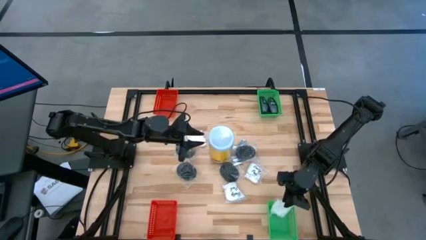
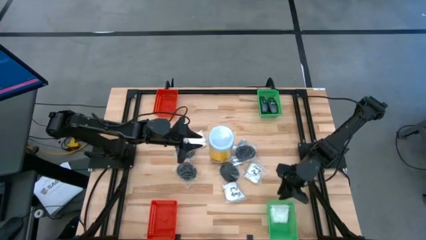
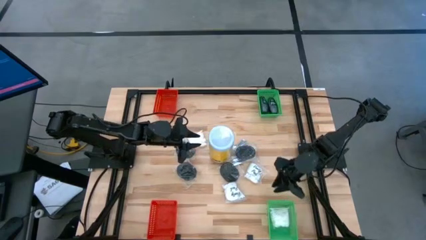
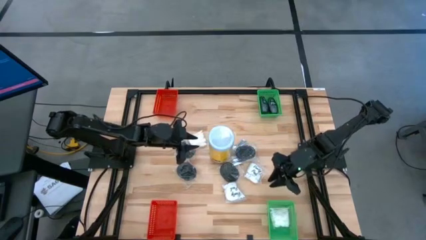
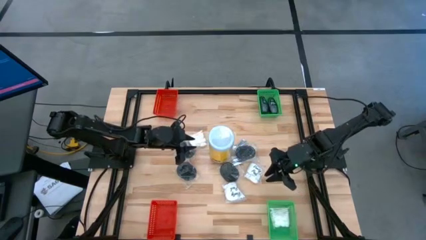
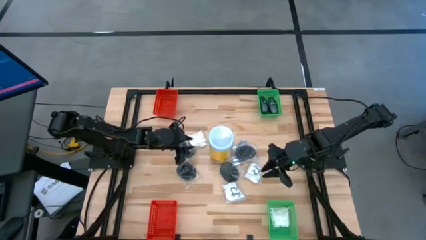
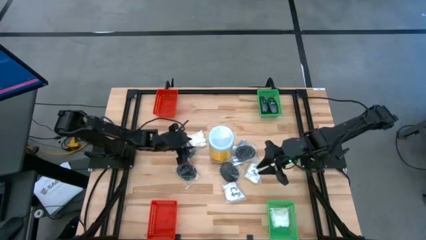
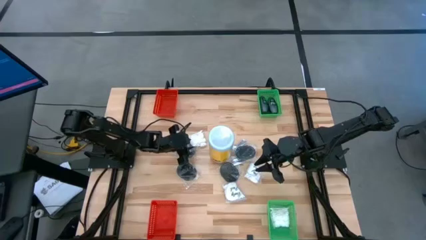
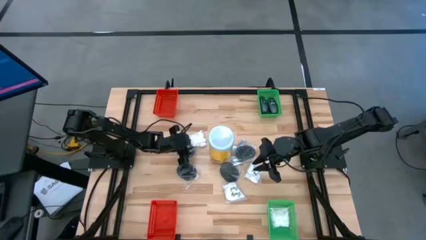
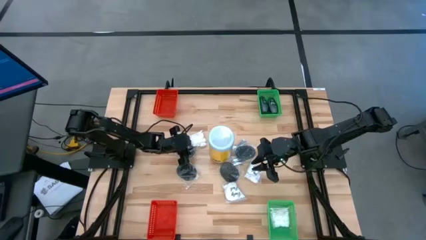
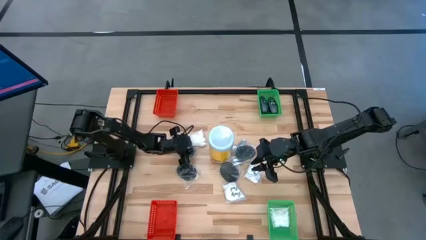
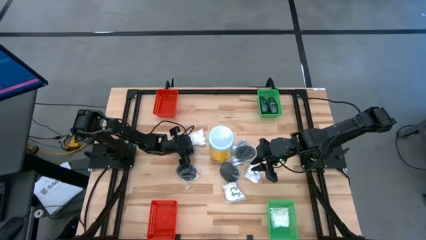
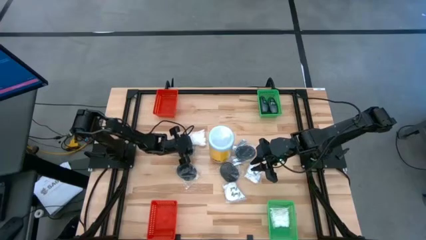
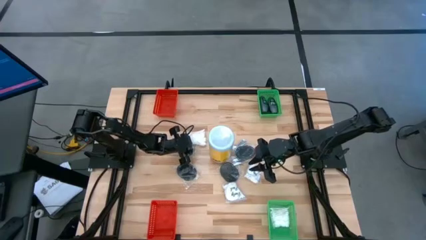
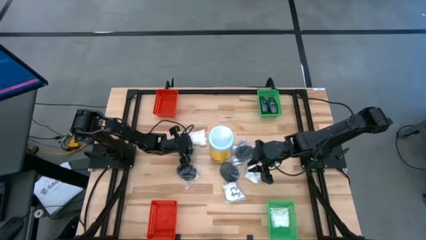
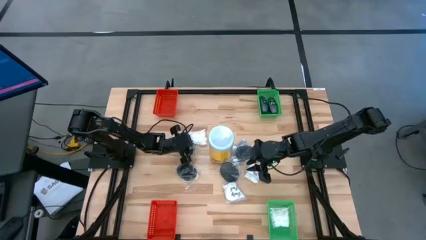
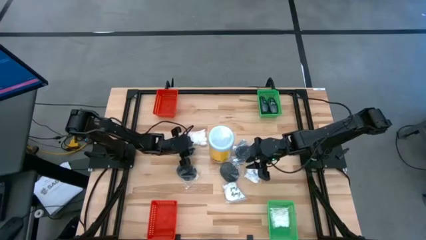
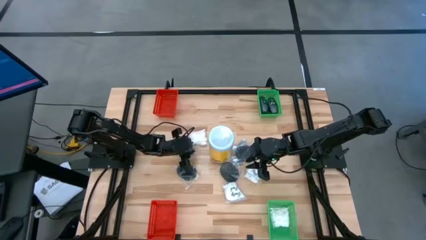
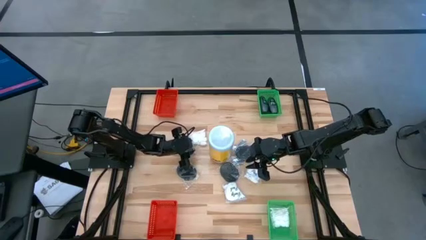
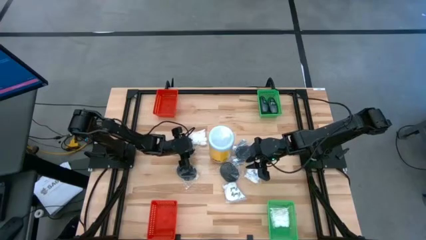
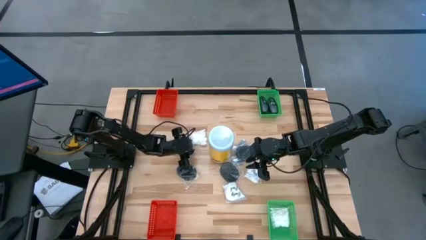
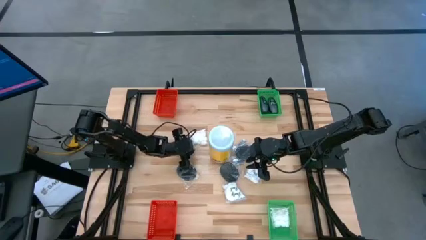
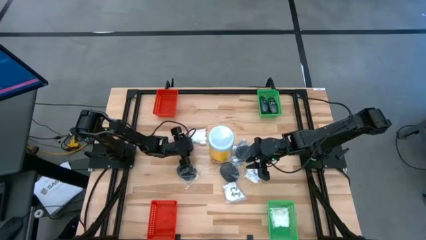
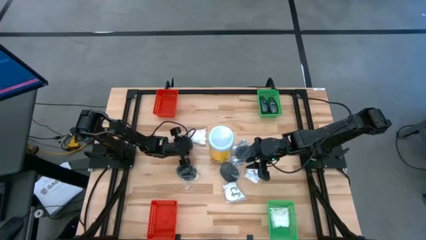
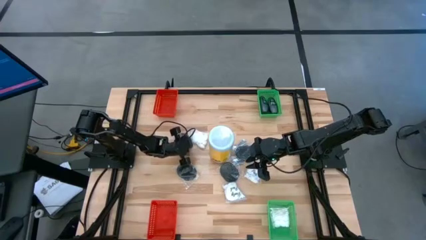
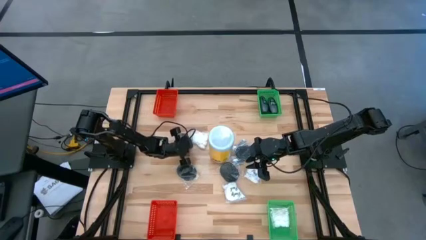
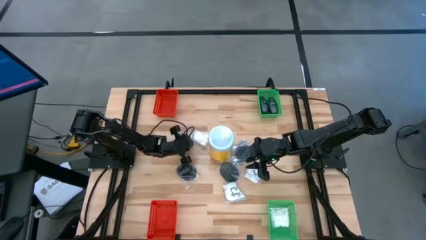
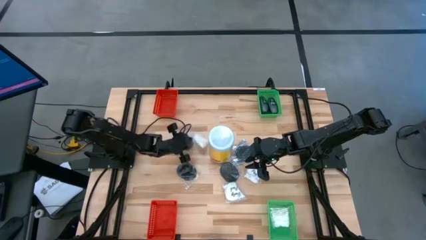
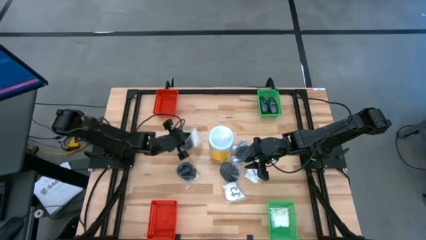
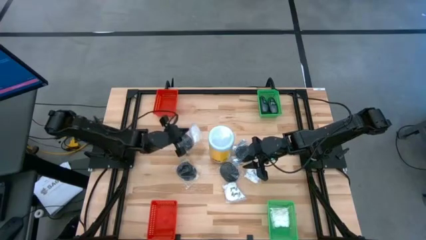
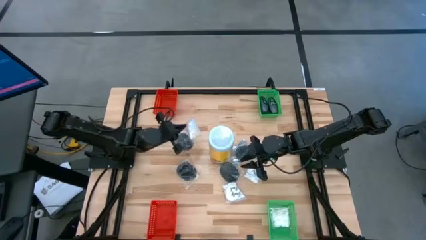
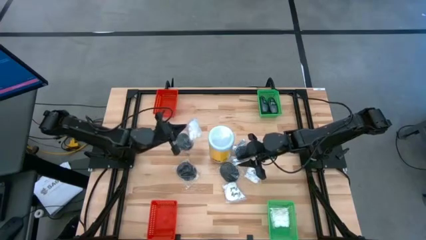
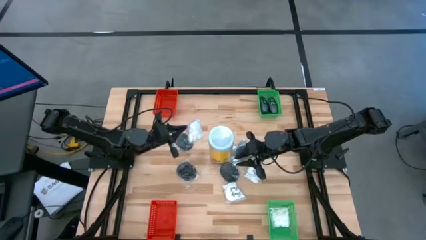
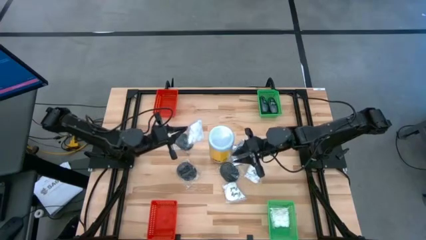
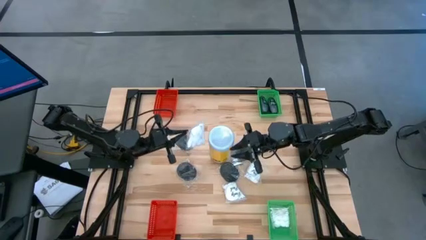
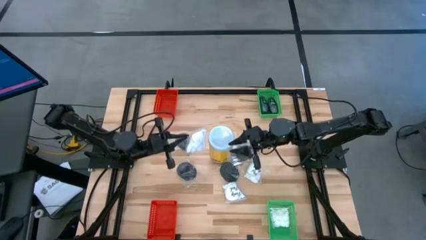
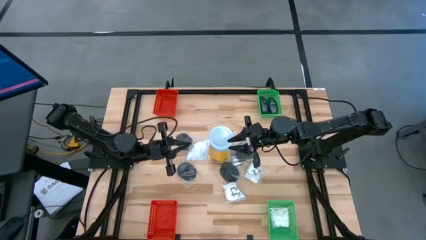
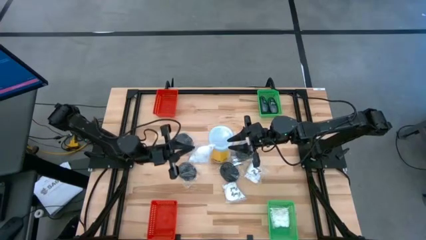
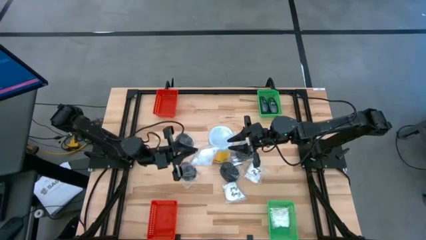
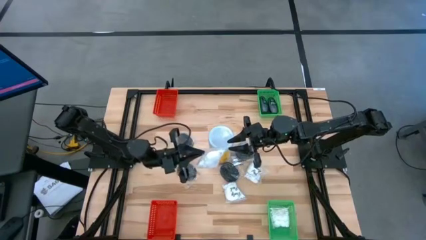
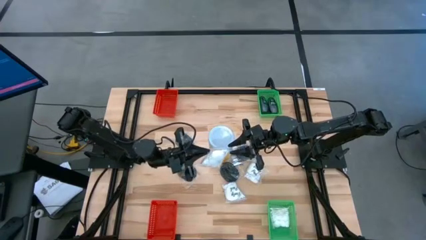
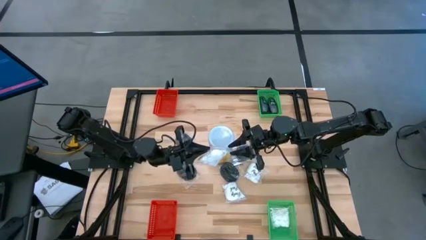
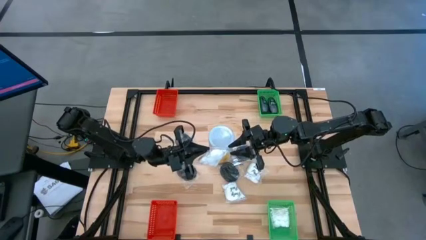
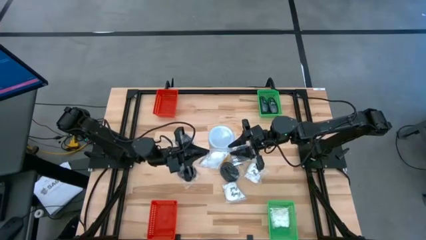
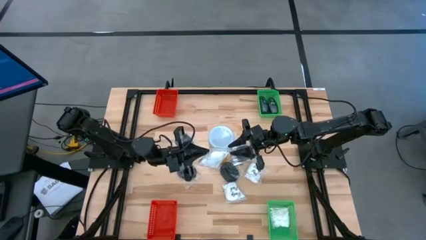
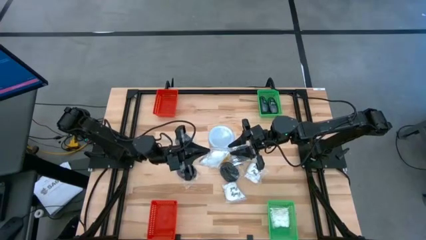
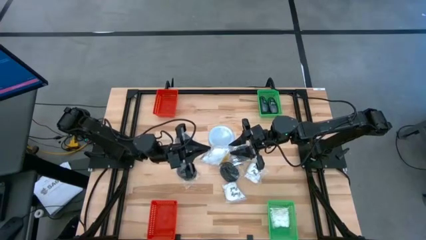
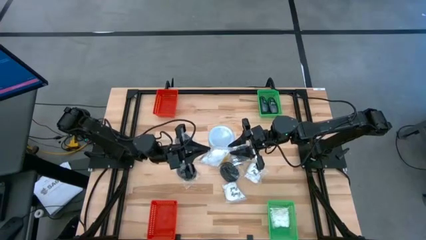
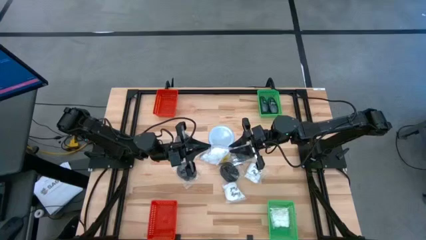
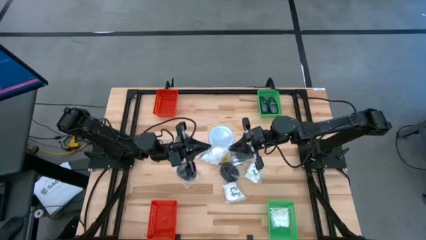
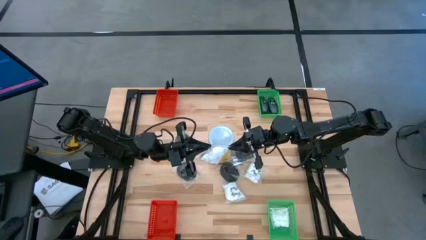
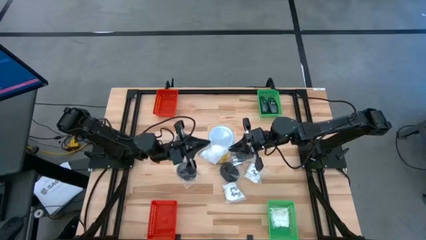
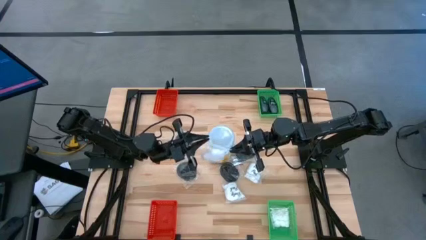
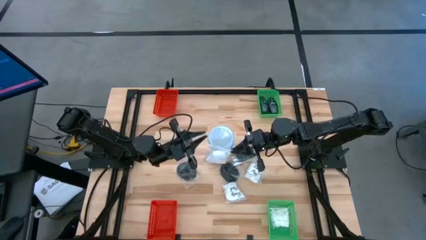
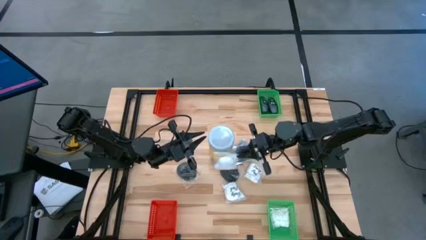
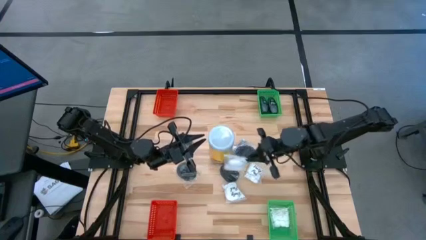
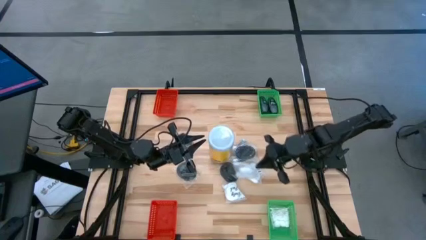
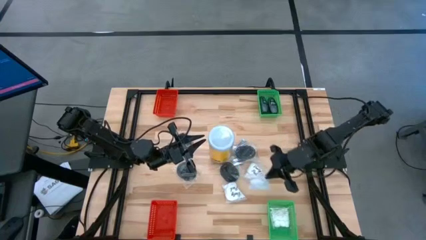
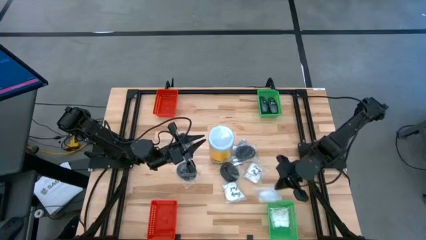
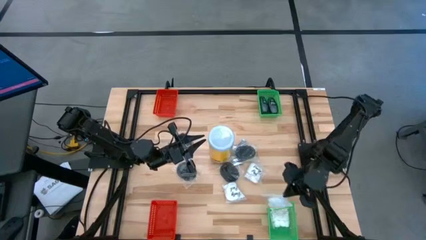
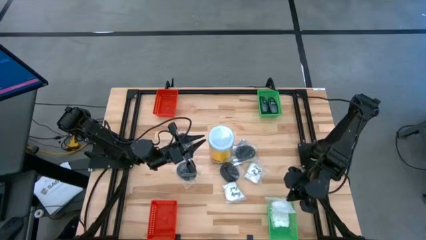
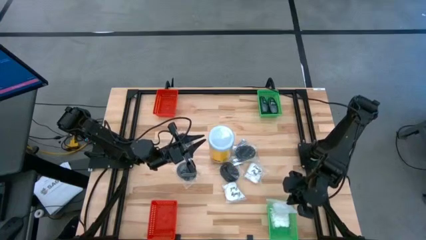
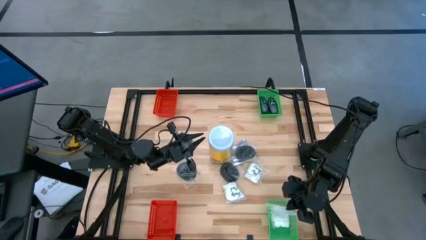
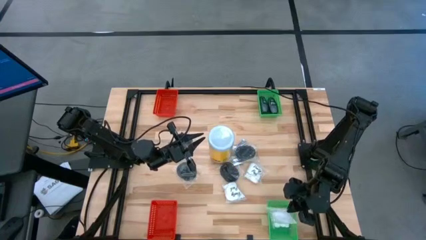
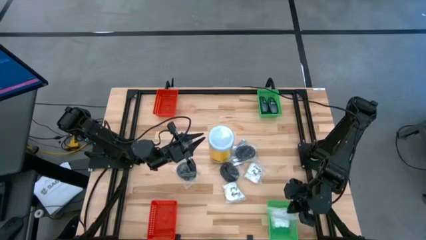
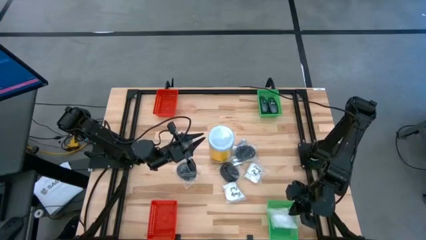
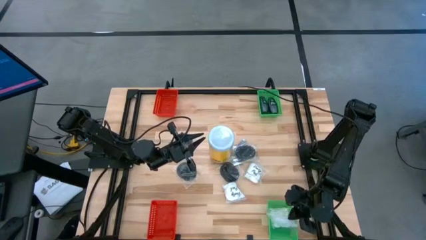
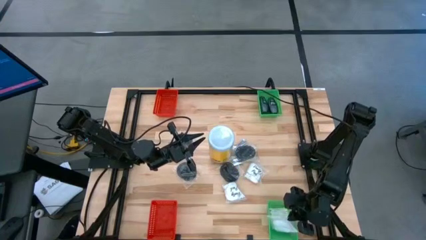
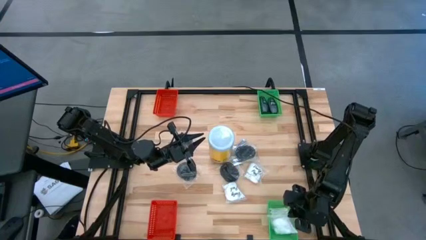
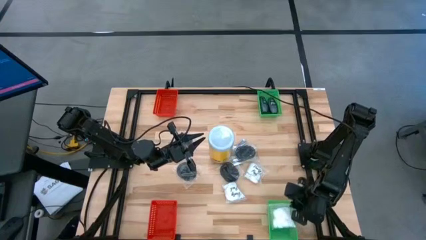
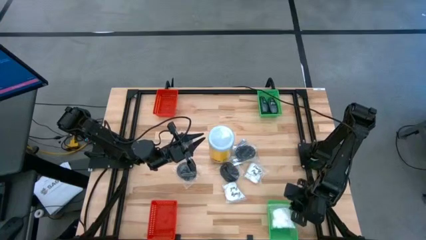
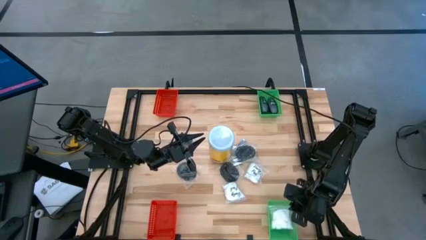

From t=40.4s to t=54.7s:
Task: Pick & Place Travel size toiletries
Put the white cotton pack into the bottom green bin

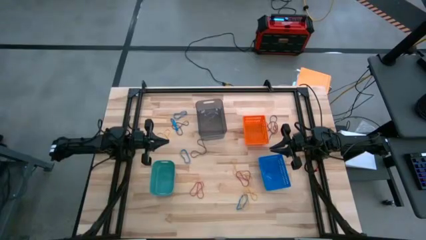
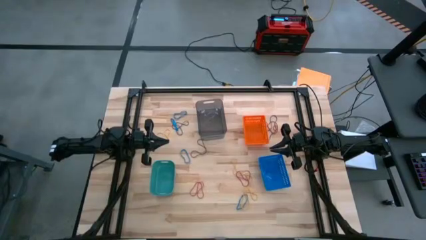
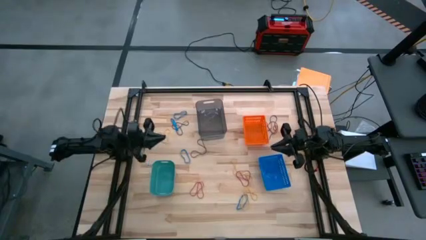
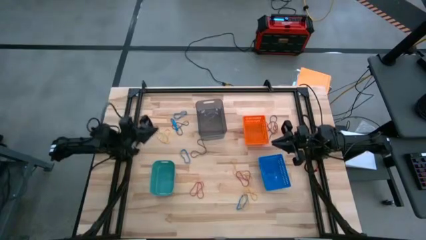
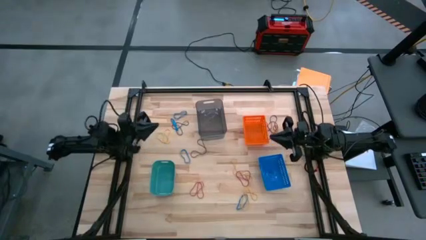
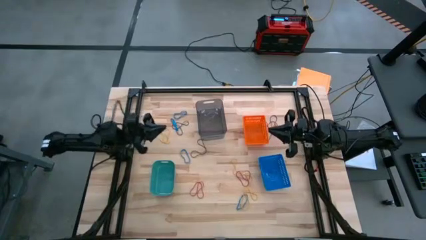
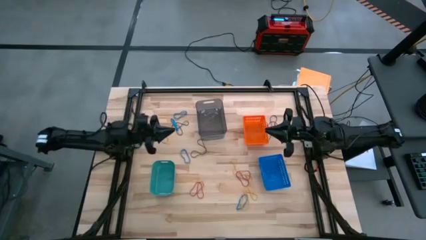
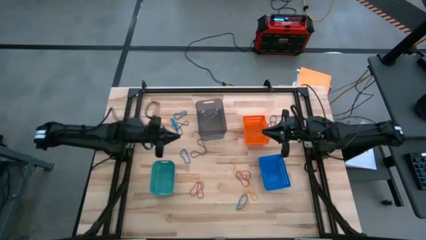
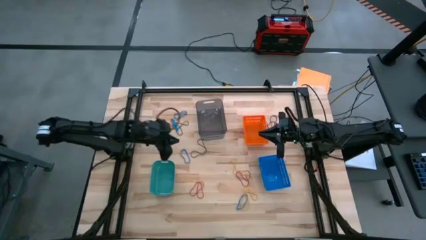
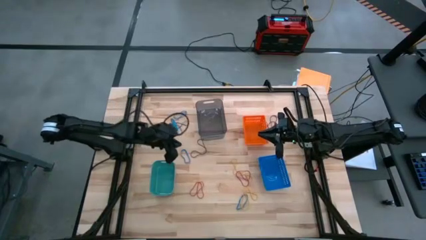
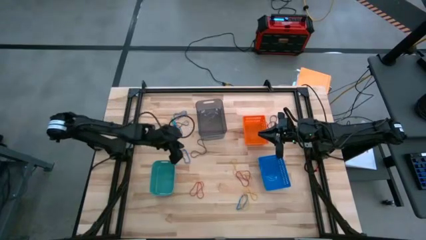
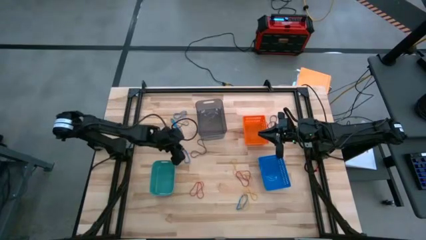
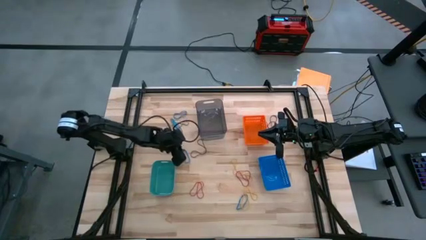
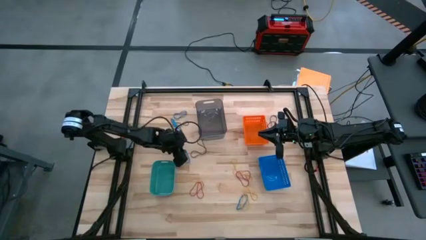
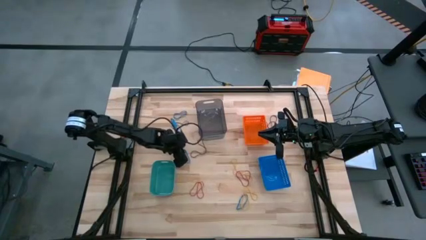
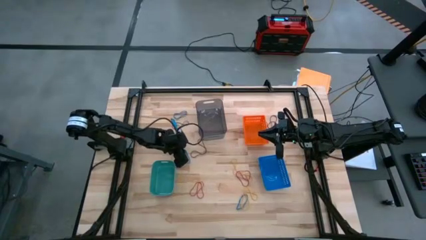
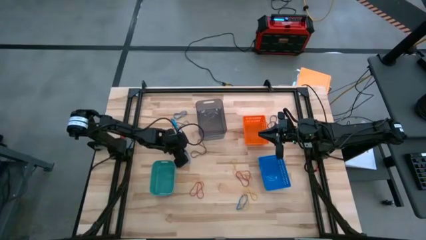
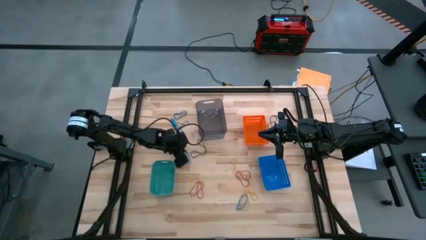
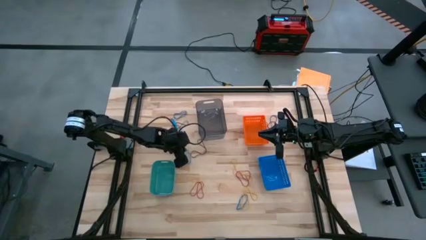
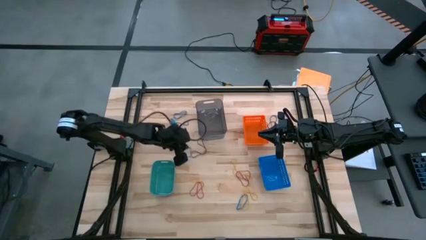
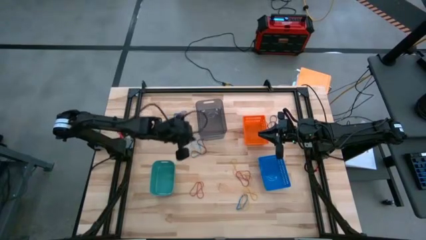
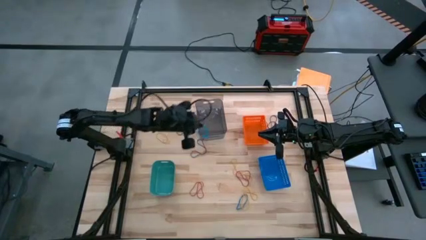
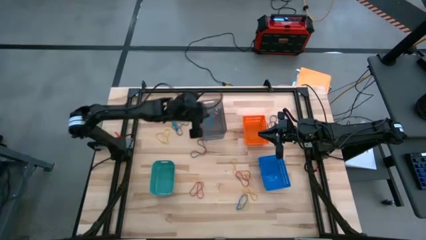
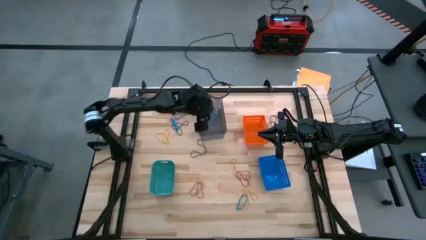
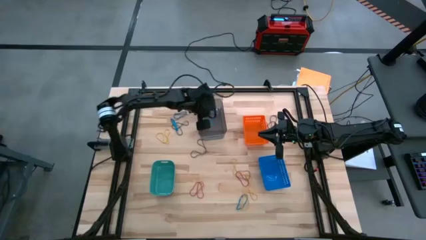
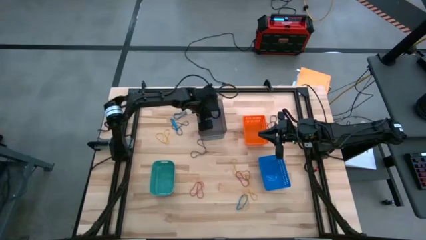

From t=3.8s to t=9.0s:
Task: Sort rubber bands into baskets
Put the blue rubber band into the black bin
